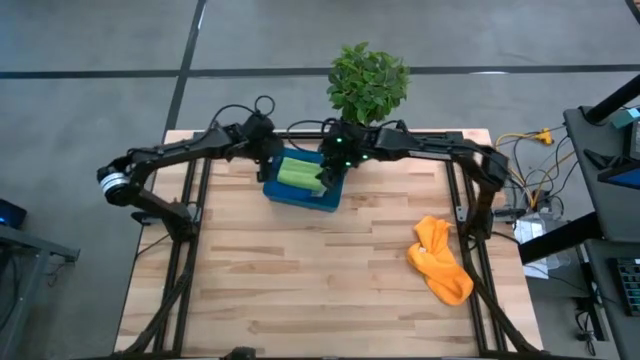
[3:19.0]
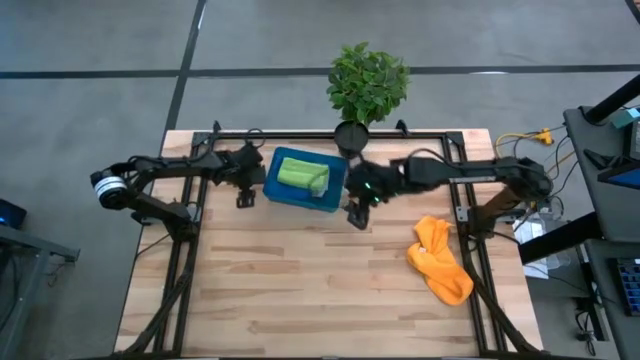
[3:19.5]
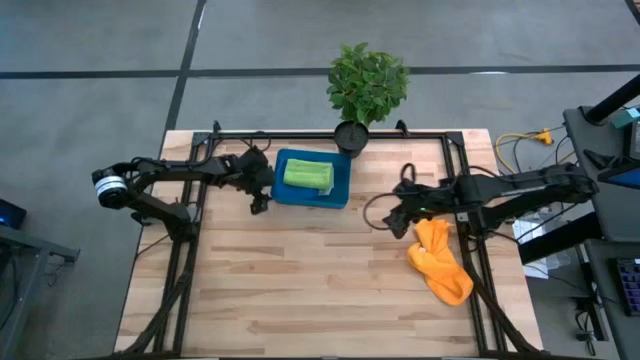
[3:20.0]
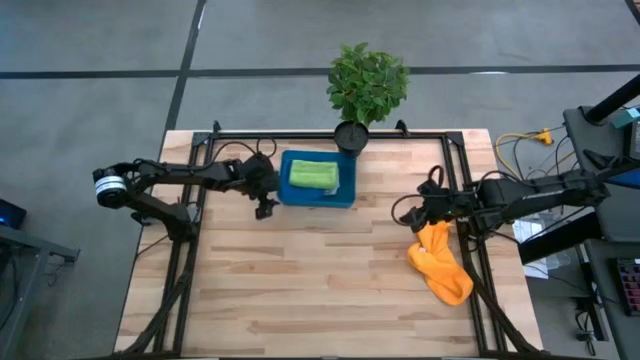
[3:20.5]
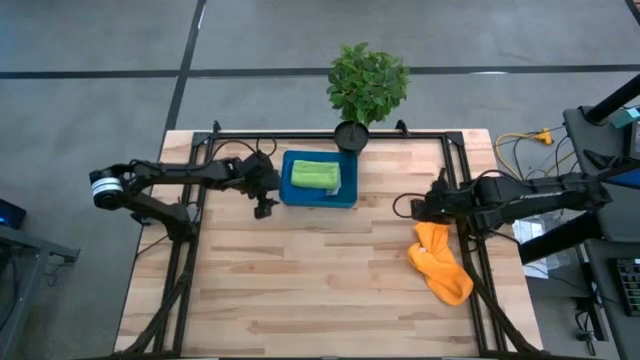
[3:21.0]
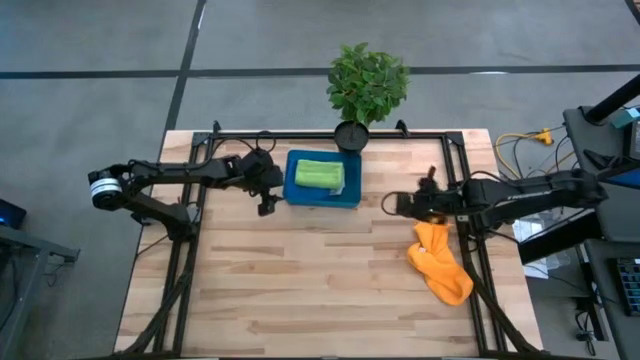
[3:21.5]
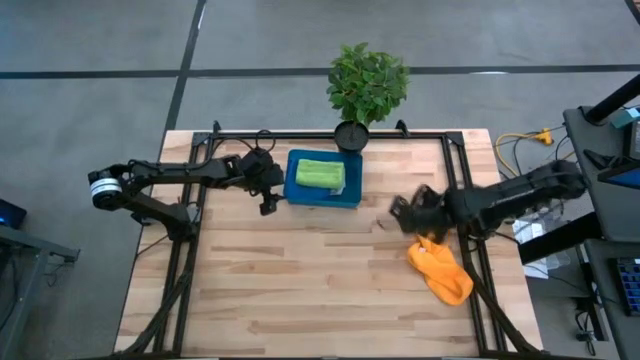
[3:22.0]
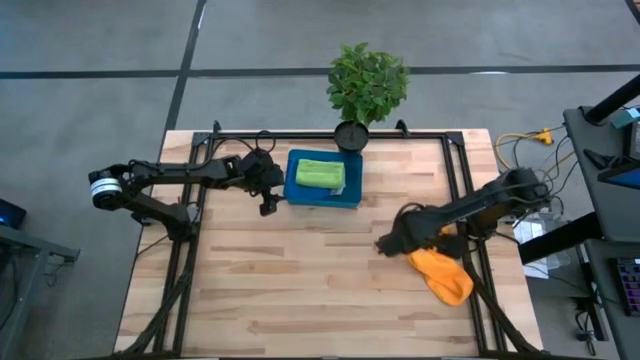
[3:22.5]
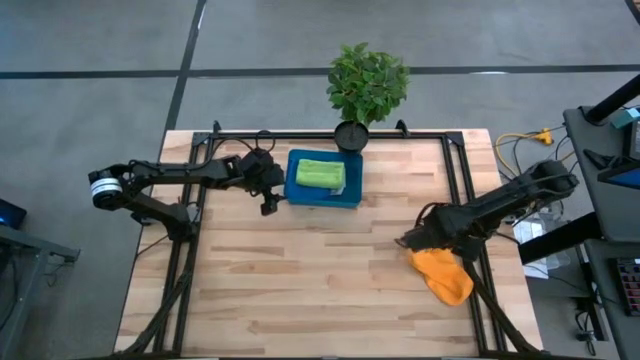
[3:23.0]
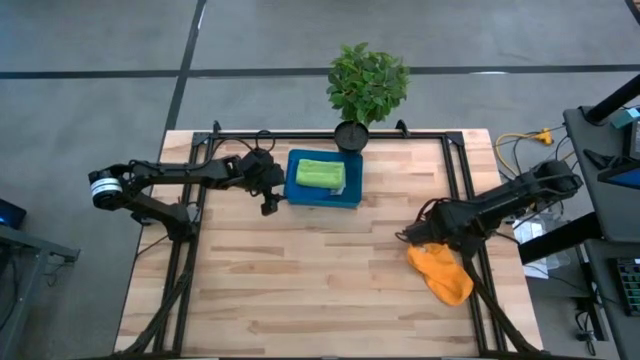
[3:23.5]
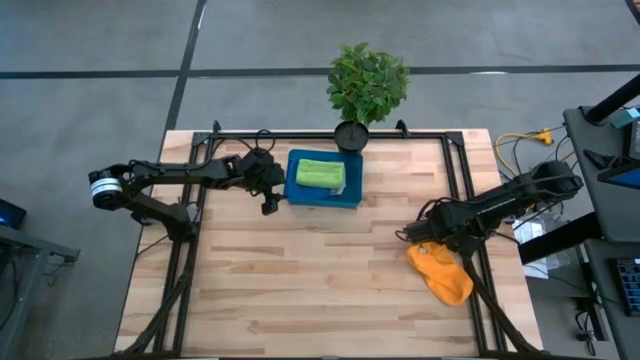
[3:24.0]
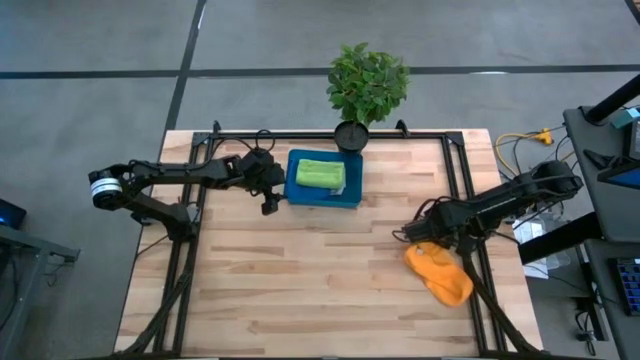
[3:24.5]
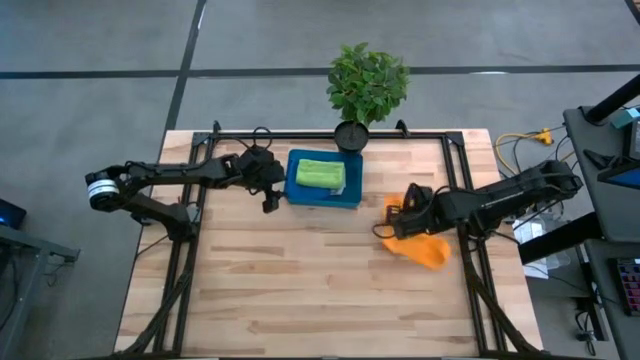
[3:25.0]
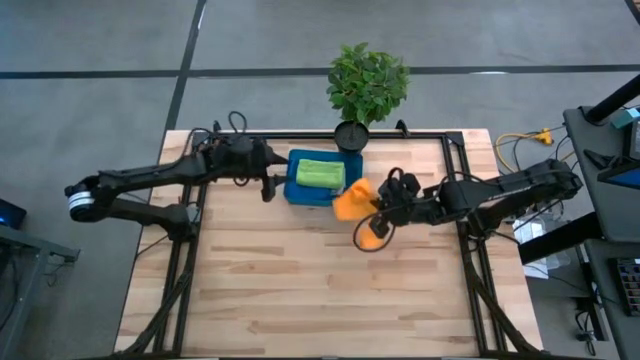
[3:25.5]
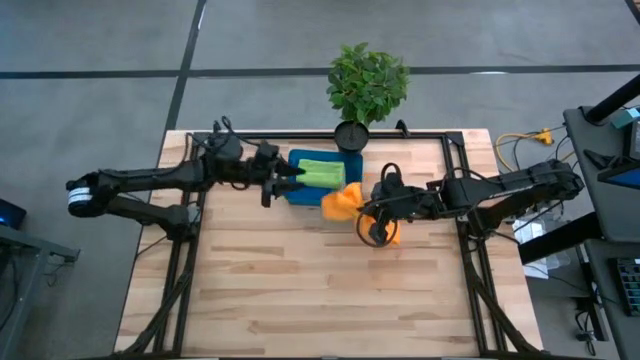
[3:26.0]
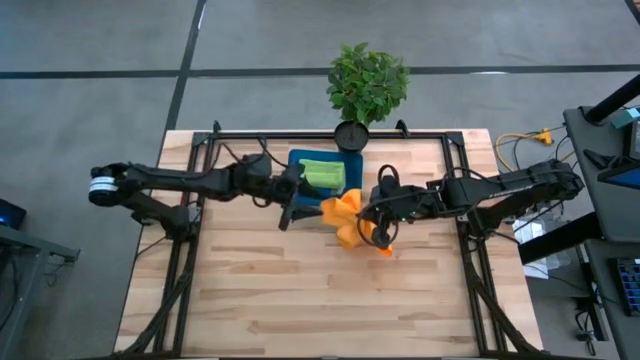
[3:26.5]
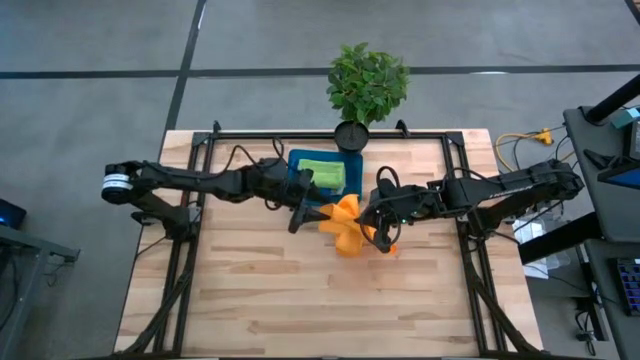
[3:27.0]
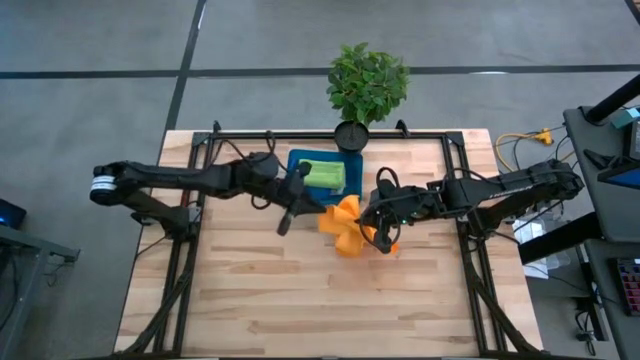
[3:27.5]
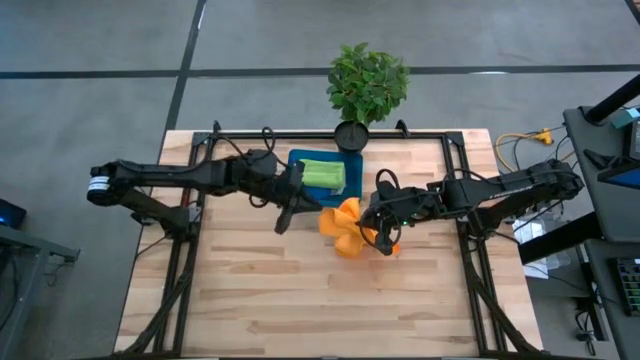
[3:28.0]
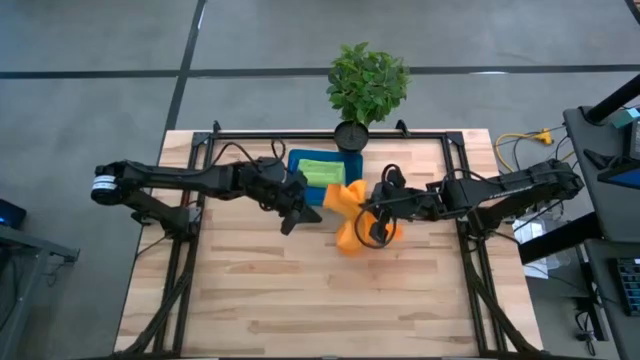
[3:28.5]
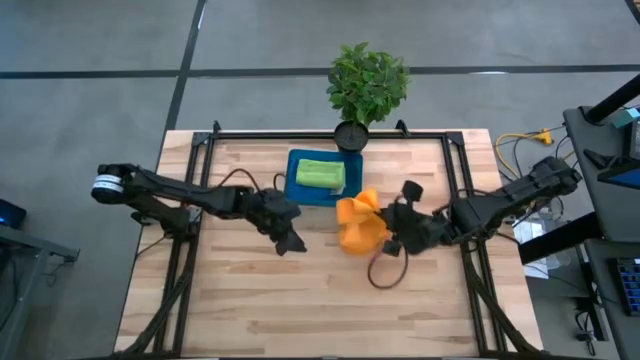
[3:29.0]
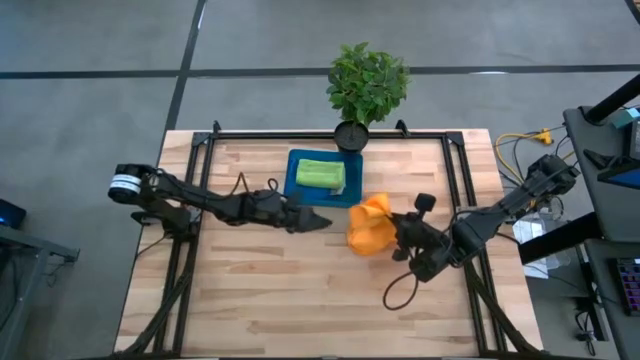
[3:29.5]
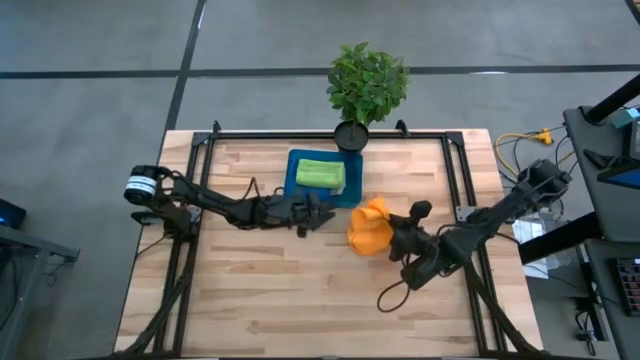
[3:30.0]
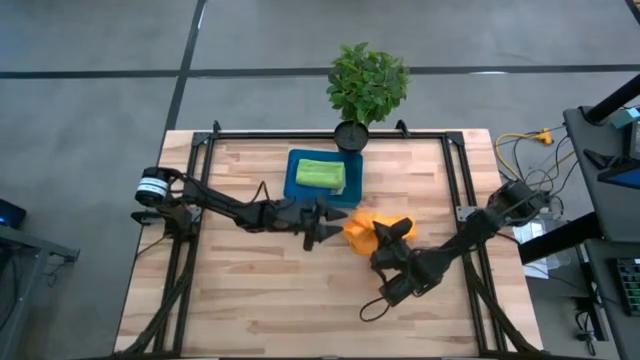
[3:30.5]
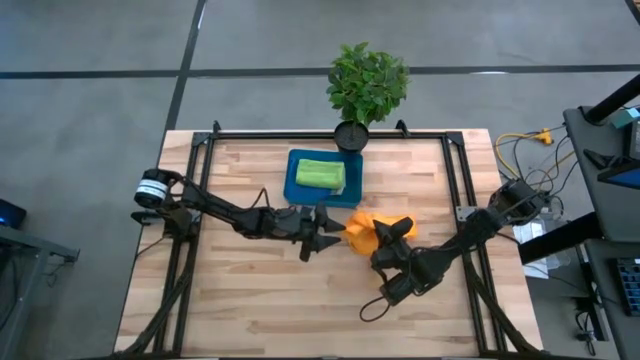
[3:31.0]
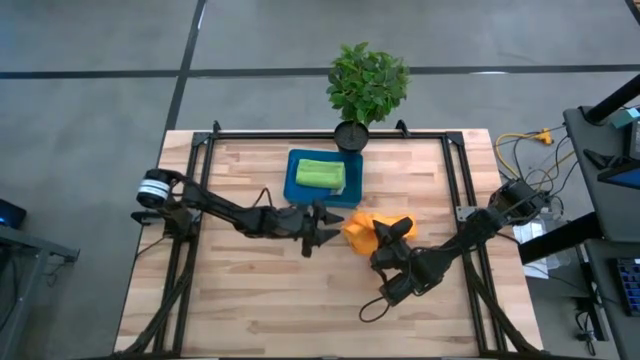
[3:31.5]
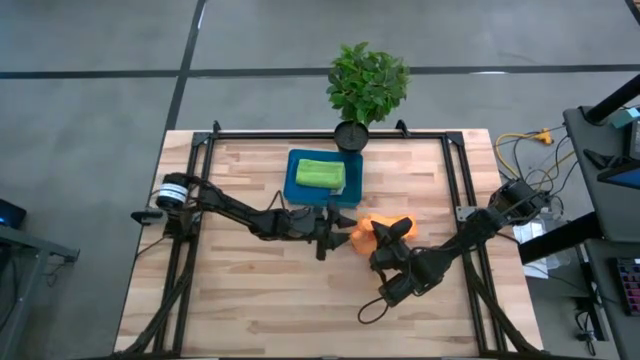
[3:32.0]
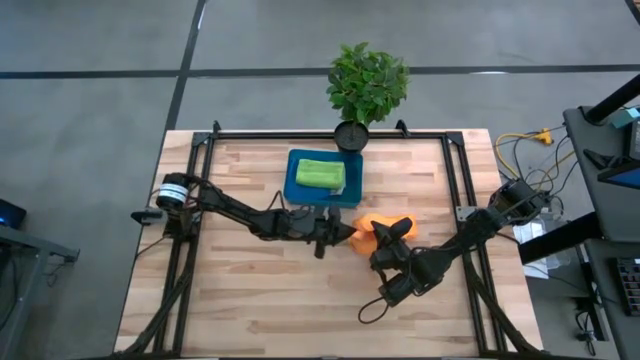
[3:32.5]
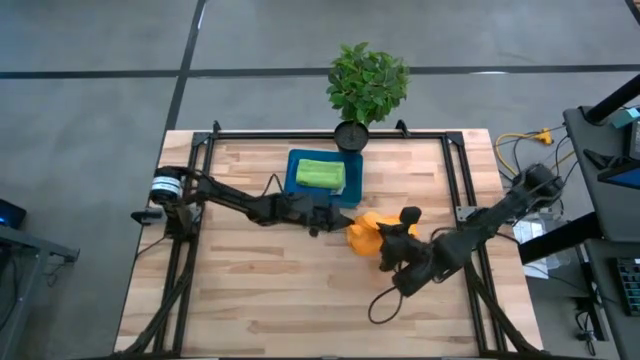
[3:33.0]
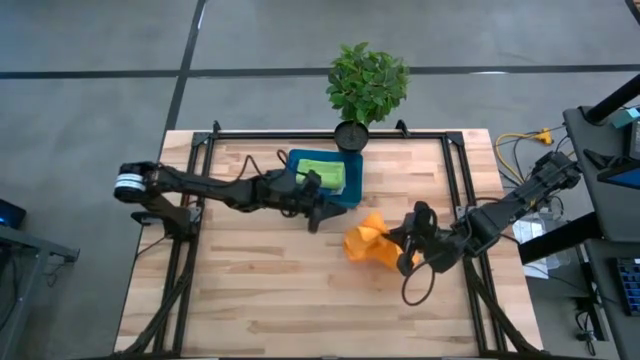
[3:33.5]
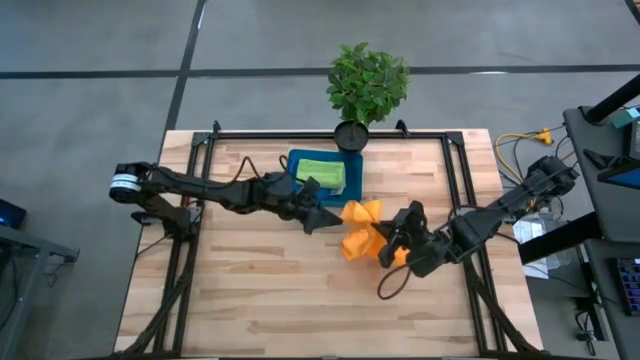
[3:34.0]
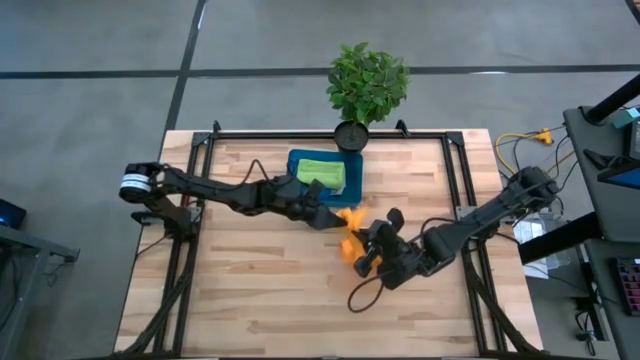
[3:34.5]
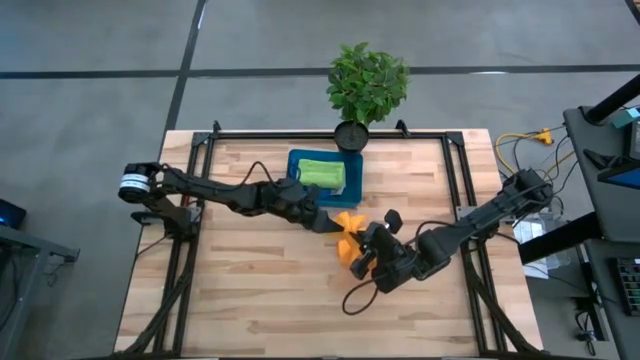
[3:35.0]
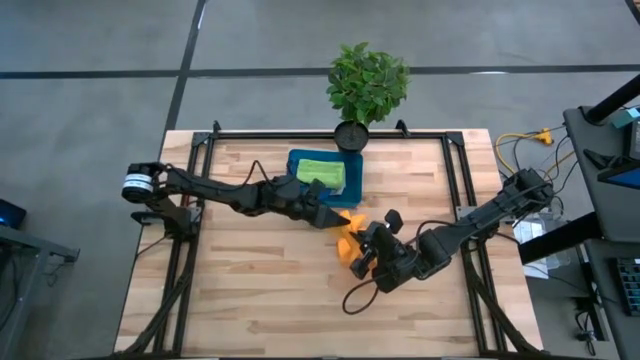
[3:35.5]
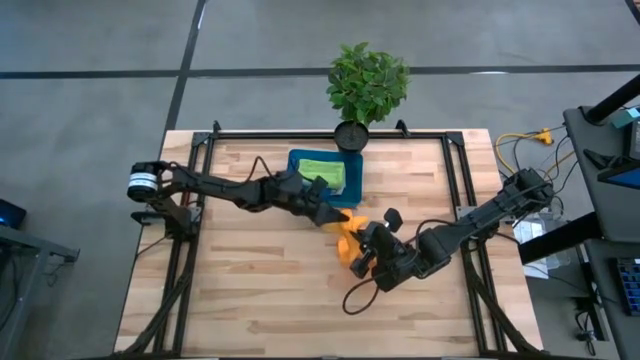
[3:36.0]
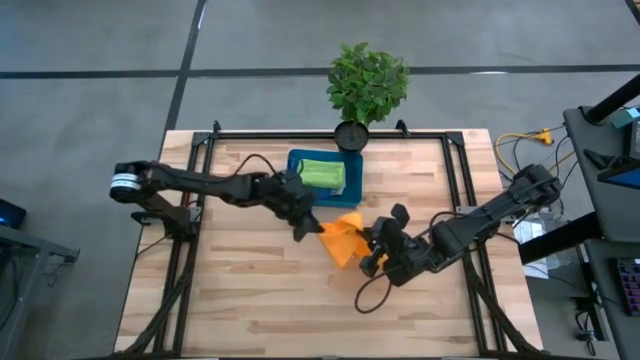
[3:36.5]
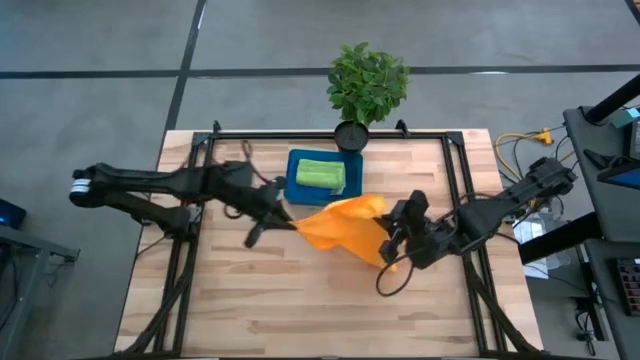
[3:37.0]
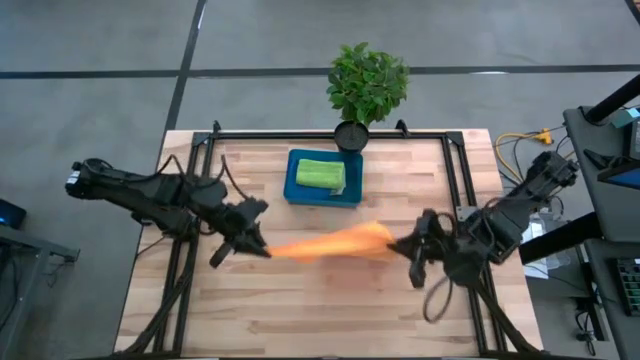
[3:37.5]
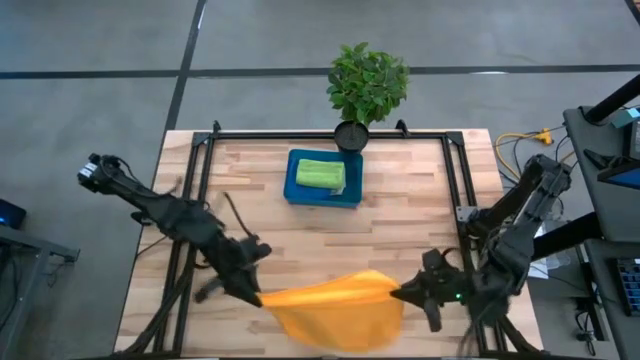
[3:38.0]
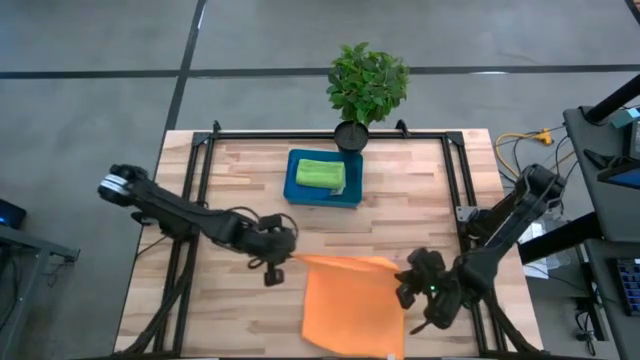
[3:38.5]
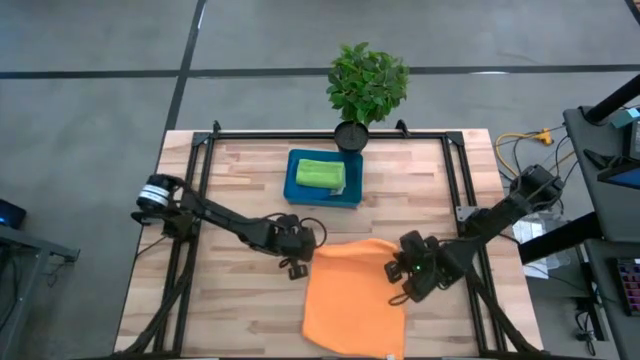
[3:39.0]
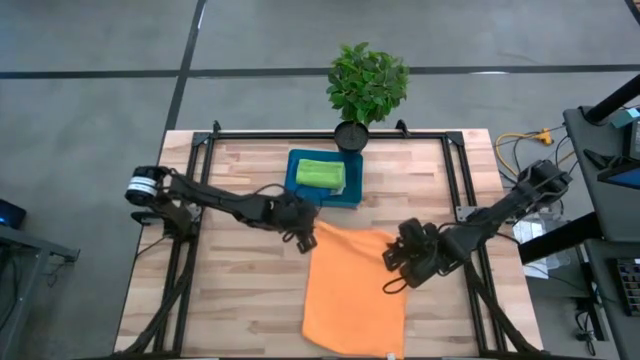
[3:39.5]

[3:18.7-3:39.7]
Task: Fold microfiber towels
Fold the yellow microfiber towel
